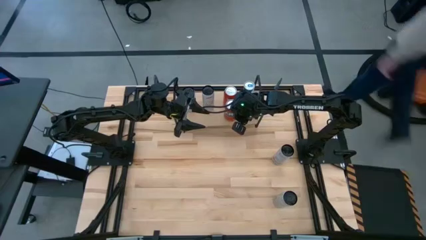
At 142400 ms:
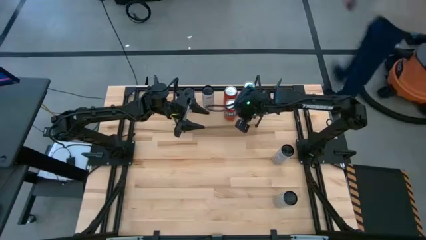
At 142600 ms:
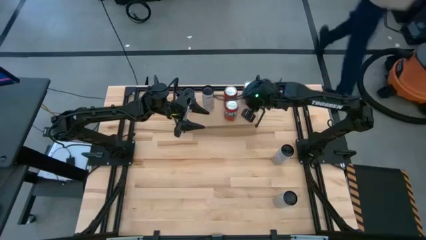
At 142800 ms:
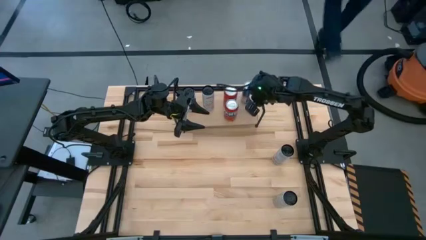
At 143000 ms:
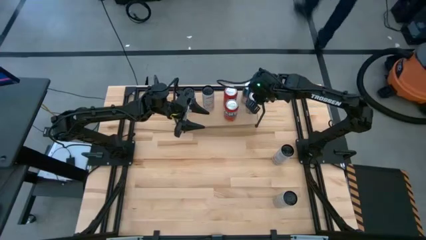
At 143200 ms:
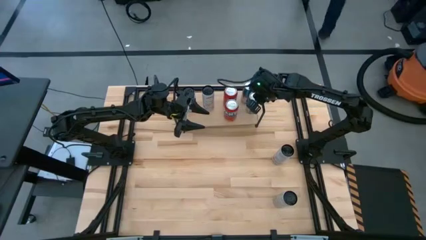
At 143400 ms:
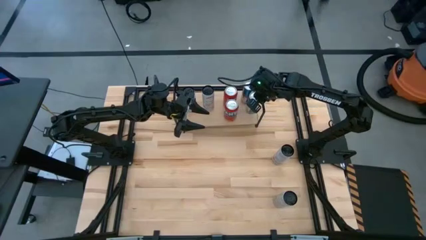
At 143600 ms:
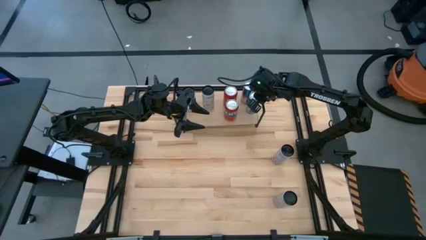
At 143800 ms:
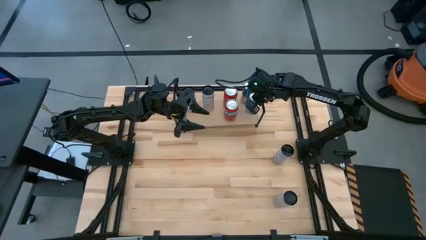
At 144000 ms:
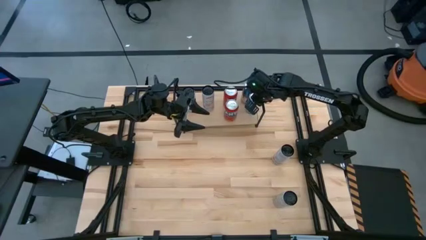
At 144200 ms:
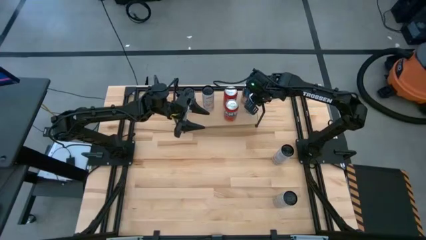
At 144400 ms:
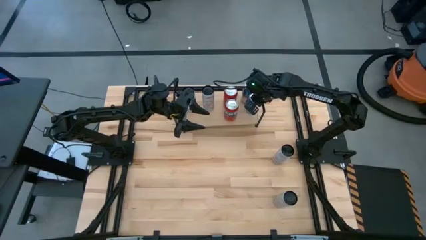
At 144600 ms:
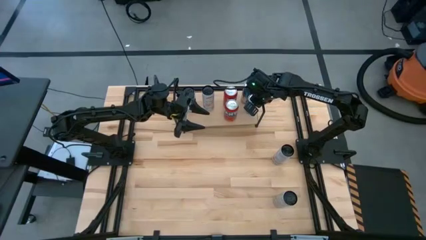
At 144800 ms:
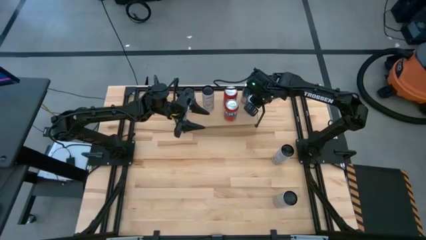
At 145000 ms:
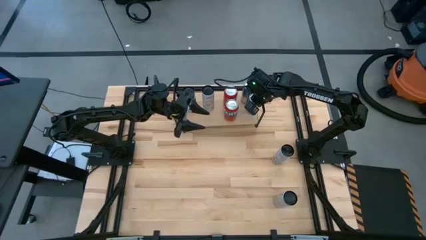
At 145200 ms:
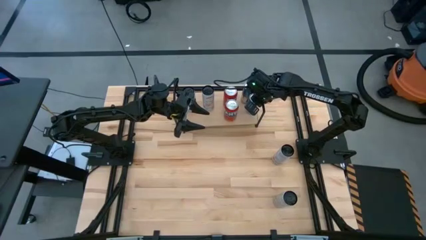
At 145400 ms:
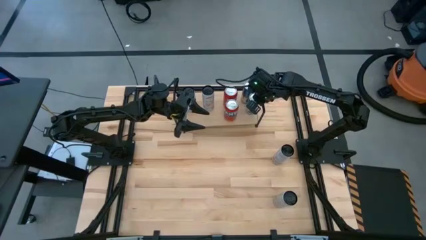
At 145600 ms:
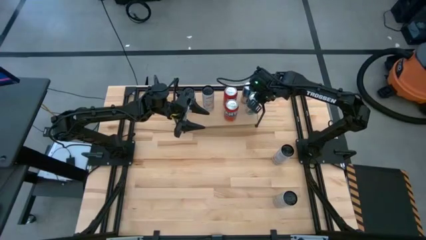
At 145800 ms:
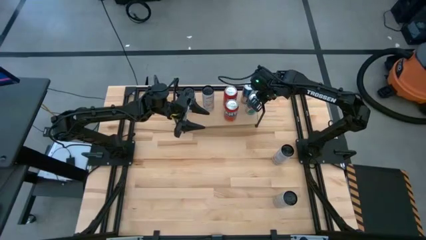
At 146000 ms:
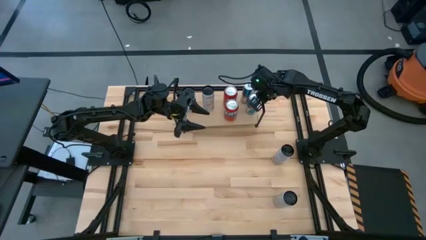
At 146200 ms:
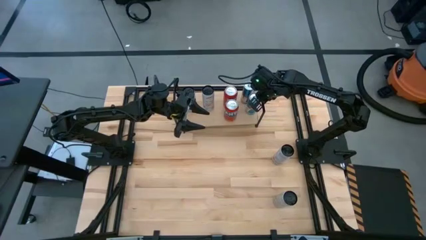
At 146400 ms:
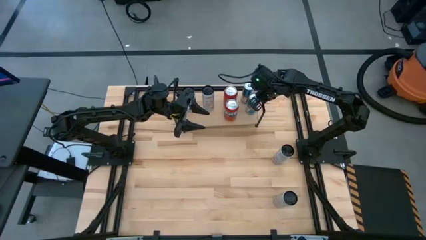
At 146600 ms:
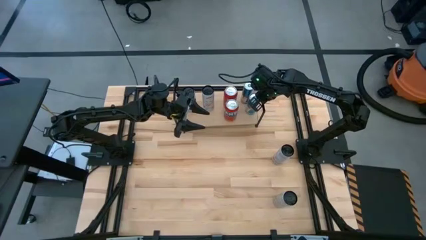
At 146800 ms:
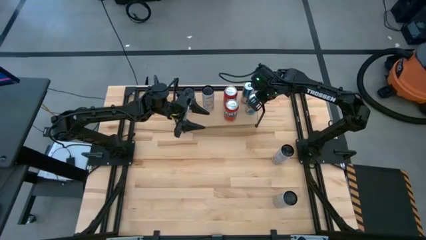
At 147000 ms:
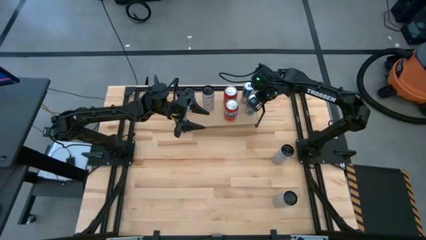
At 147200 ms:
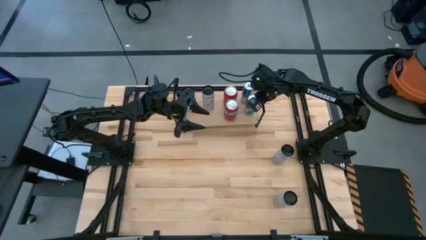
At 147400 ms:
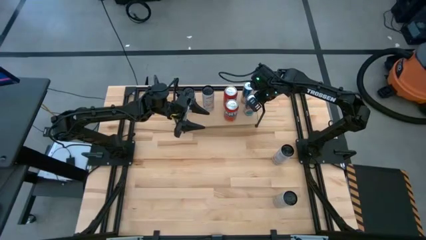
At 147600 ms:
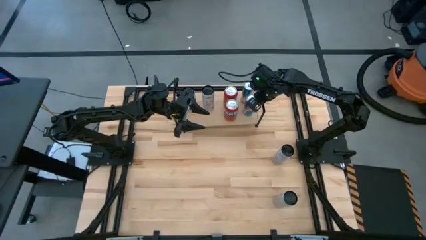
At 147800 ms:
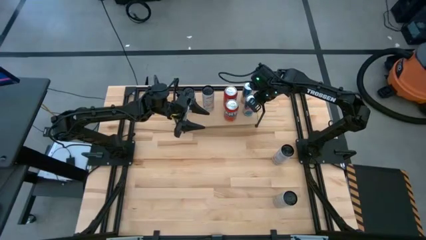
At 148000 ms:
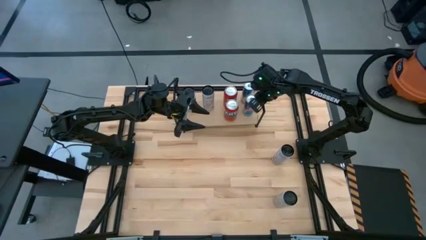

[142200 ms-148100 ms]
Task: Place canned beverage on shelf
Adjust the blue soda can on the shelf

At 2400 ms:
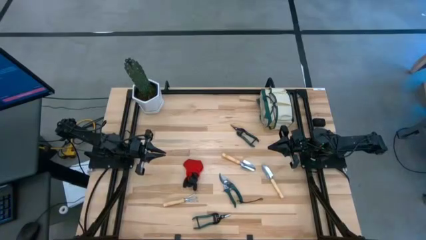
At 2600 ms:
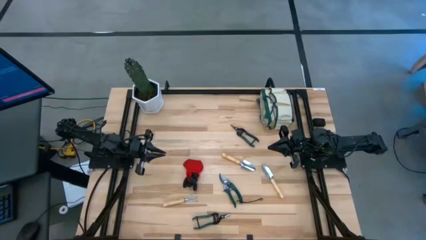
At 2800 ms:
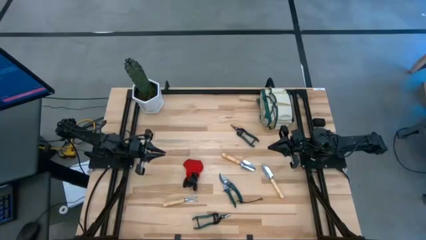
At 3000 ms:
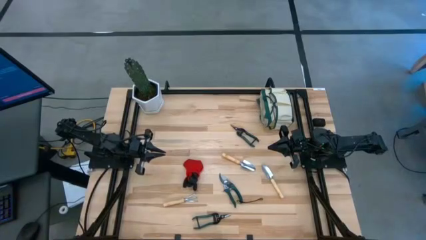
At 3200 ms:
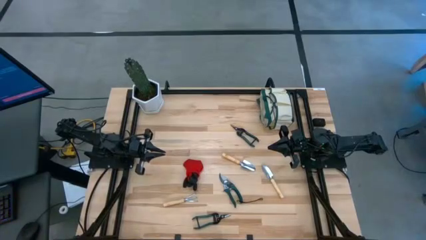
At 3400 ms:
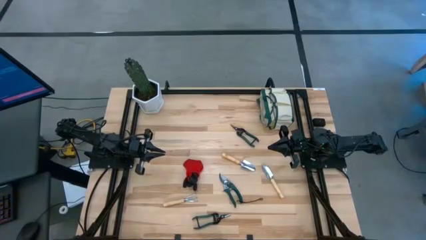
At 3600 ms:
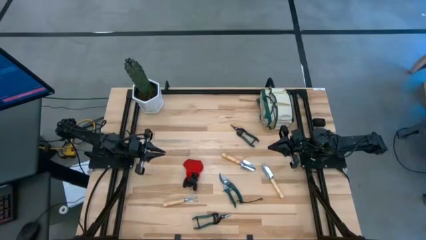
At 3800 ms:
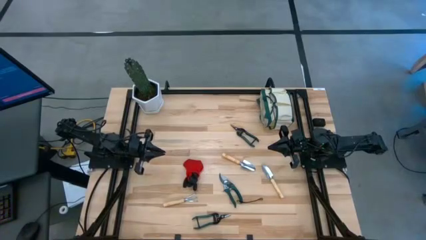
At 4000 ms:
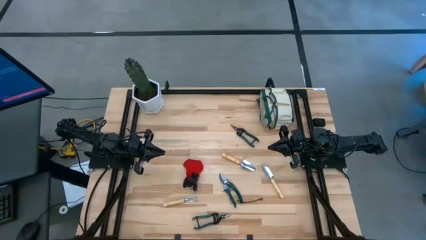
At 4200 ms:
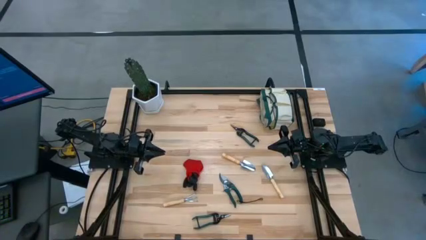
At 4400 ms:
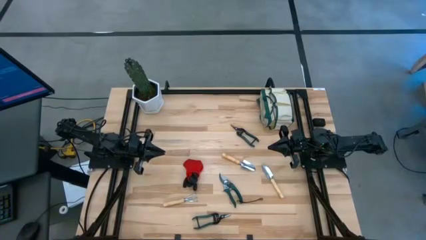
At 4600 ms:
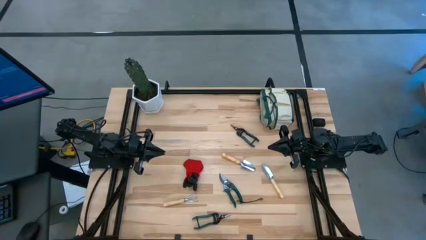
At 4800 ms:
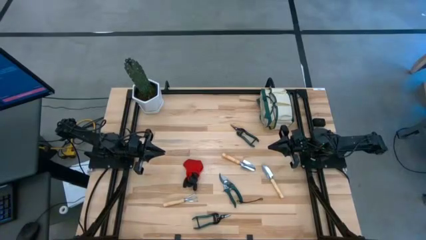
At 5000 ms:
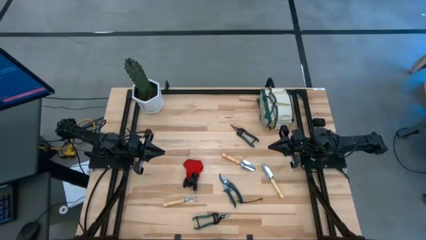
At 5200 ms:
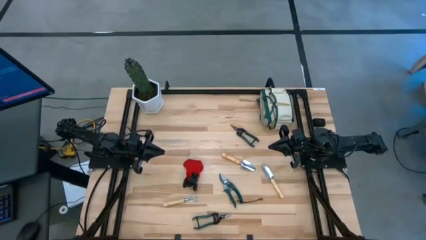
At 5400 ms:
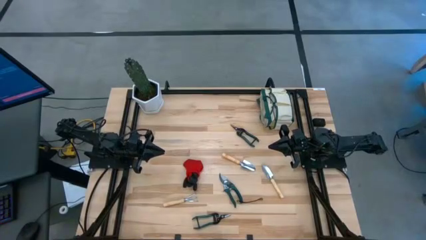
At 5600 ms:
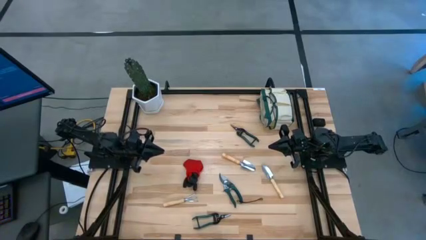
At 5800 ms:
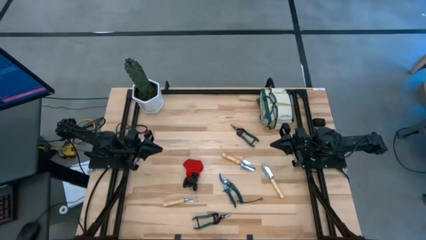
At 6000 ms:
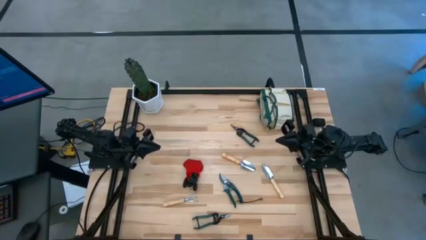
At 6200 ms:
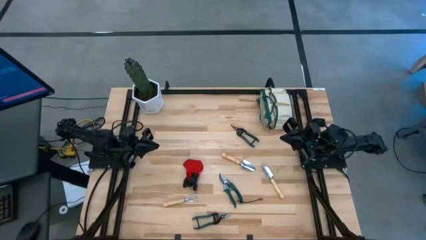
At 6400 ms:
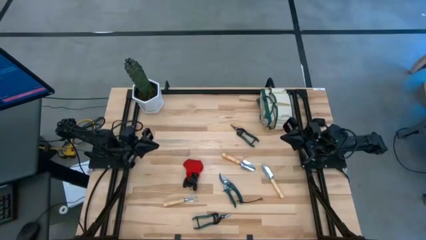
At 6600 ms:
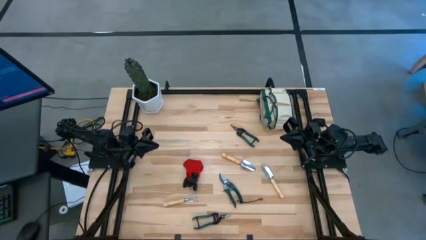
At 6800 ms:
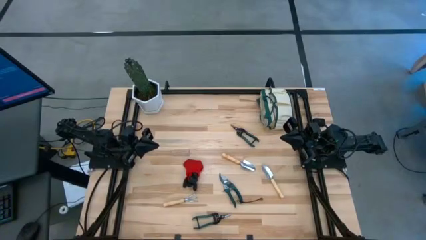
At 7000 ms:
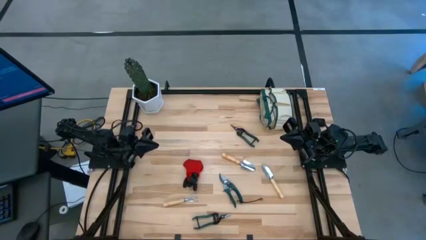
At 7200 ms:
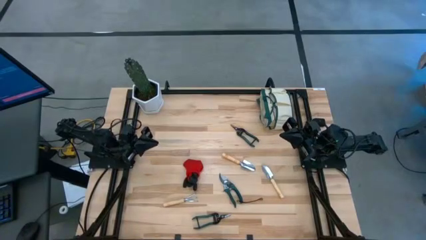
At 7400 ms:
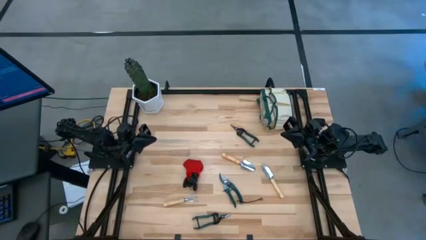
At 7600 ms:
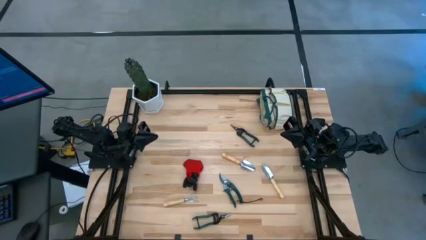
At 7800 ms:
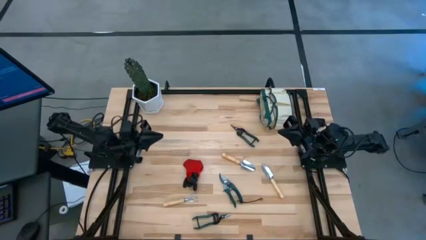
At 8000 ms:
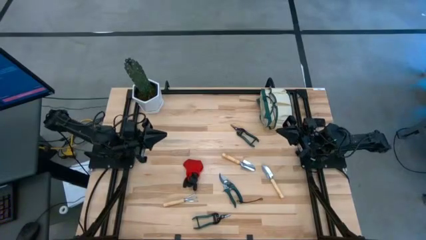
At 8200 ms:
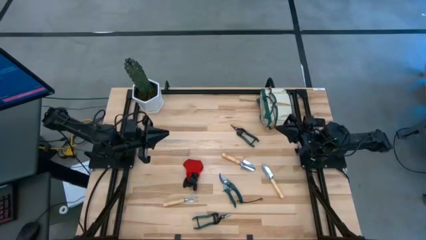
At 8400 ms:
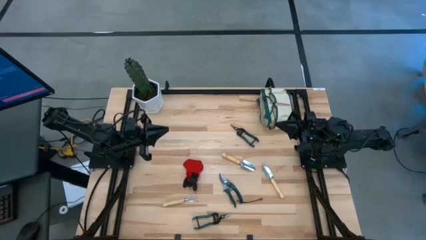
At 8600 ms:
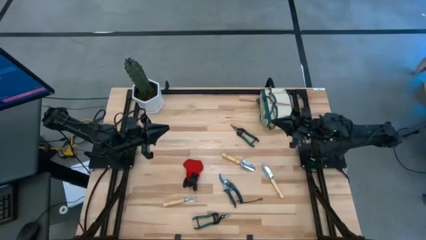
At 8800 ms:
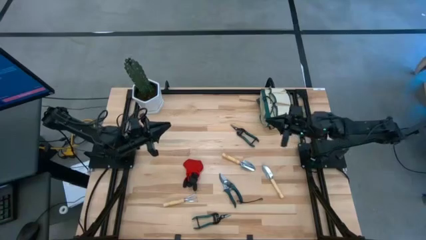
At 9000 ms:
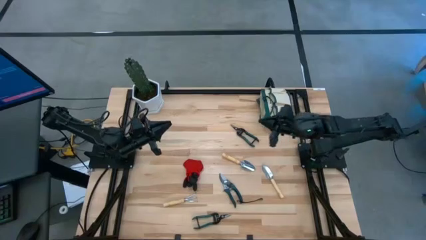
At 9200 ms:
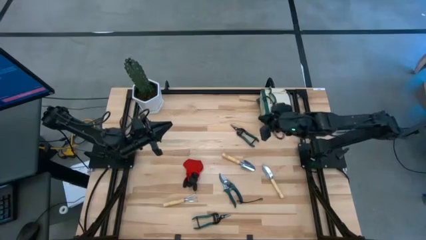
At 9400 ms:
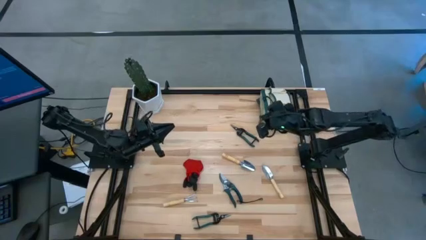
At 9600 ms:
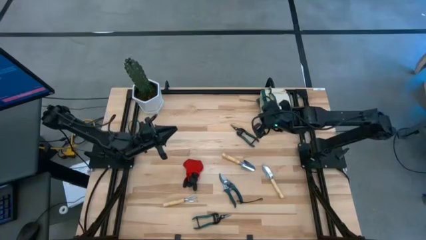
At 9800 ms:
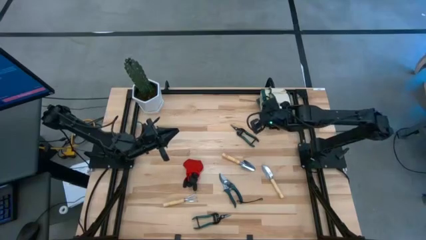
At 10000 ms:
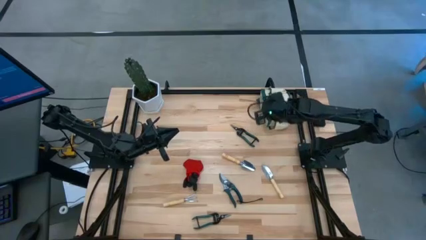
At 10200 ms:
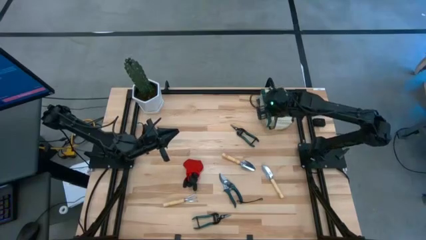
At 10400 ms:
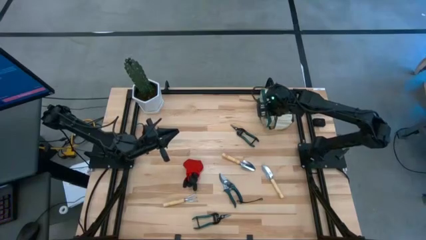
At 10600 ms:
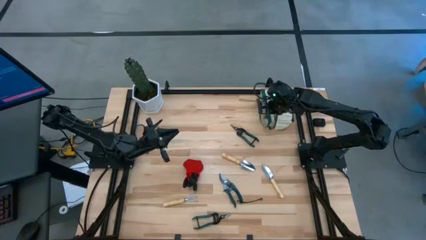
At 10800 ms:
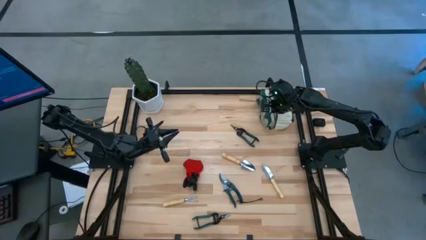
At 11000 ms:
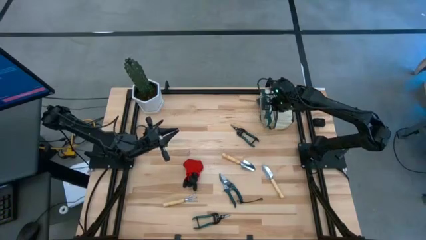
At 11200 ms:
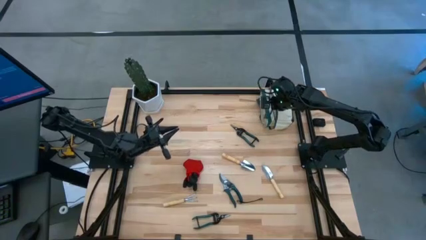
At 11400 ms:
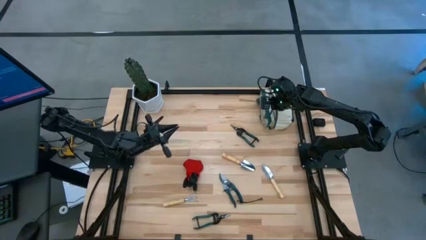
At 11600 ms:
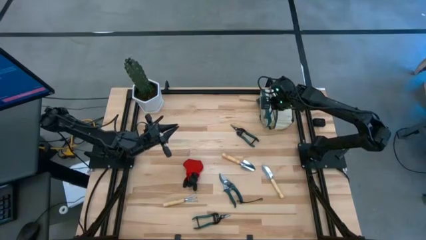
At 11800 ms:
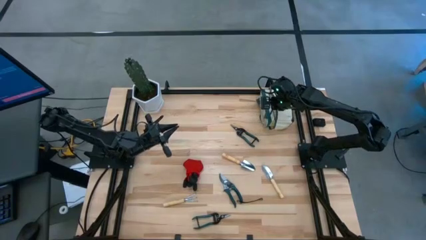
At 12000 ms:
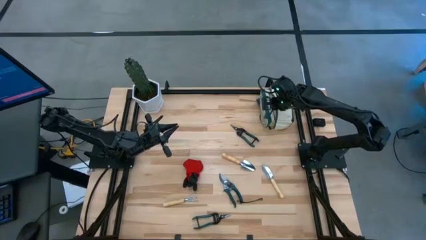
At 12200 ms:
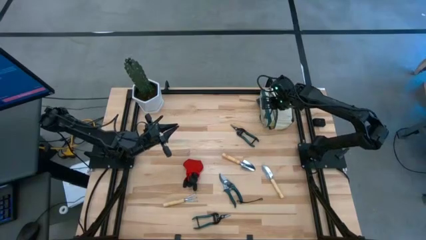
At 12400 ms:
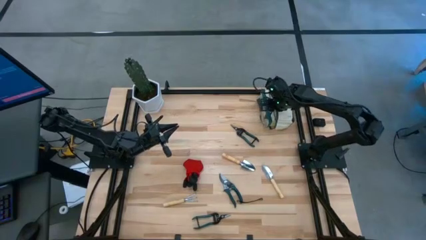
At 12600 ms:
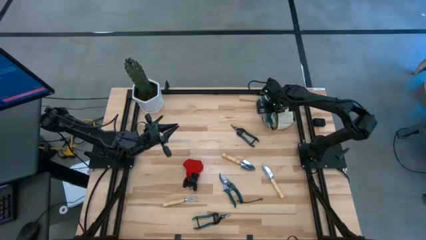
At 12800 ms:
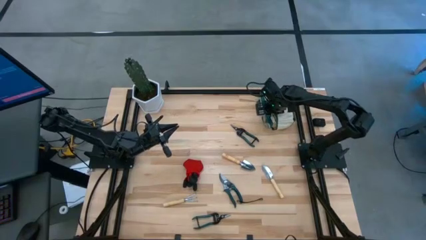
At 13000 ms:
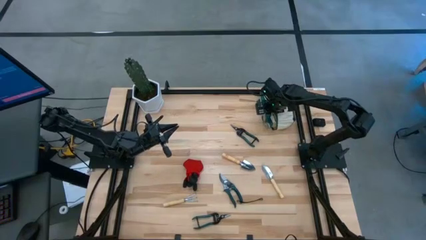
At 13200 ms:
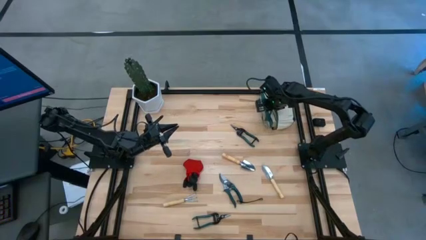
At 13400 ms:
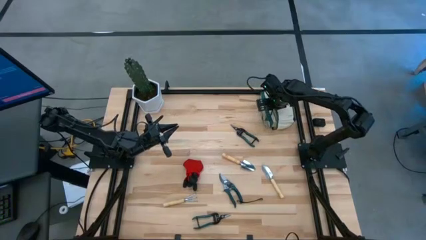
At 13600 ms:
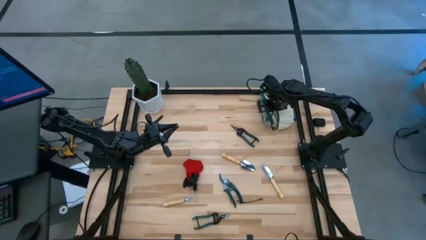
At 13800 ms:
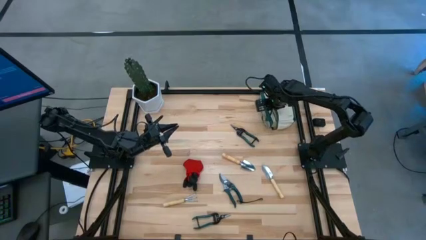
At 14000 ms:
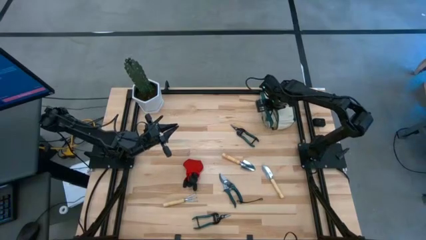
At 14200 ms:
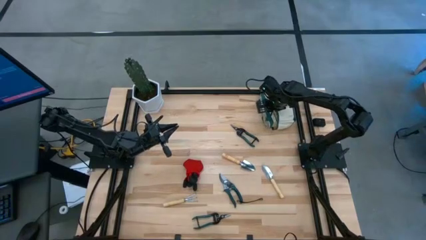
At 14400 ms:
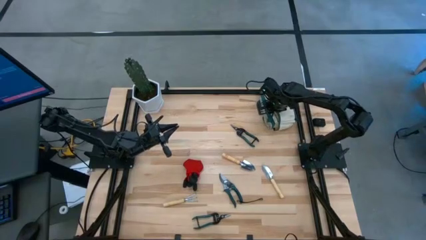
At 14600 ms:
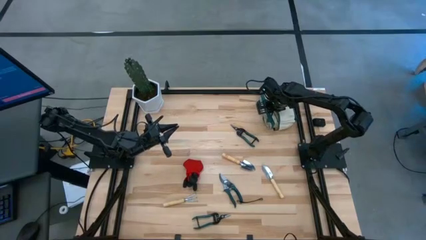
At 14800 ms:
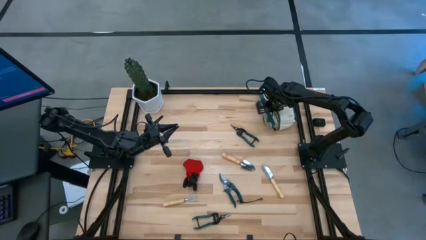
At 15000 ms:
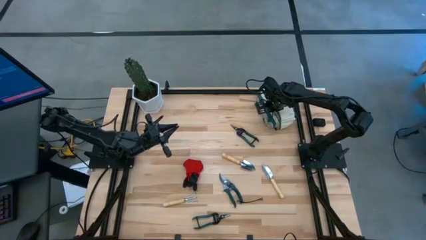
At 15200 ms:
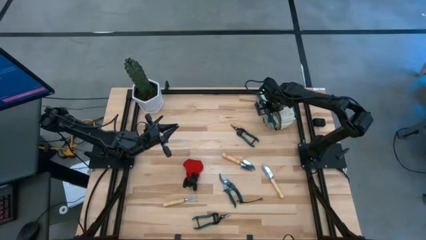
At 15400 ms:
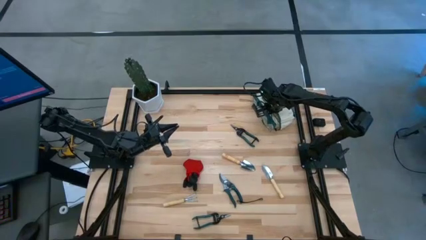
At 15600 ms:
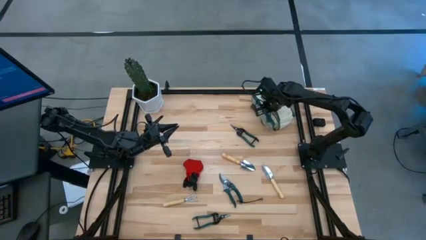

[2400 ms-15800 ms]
Task: Pick & Place Garden tools in Gardening bag
Move the gardening bag to the top middle of the table
